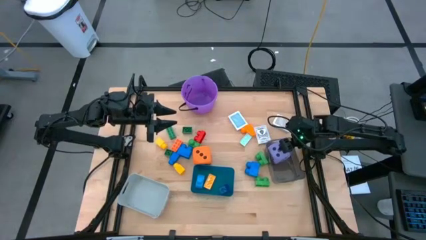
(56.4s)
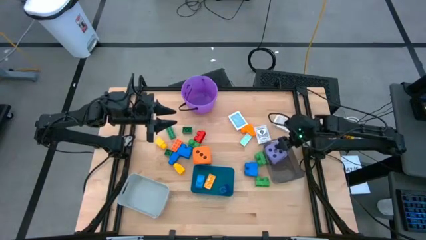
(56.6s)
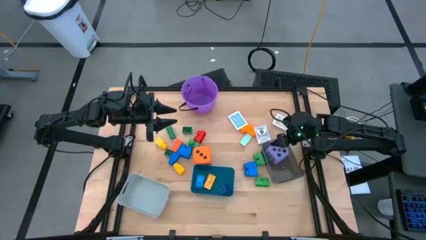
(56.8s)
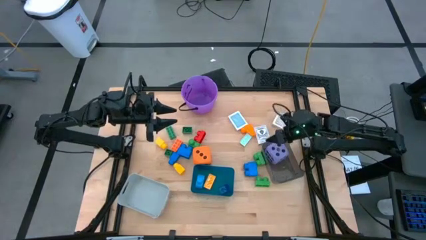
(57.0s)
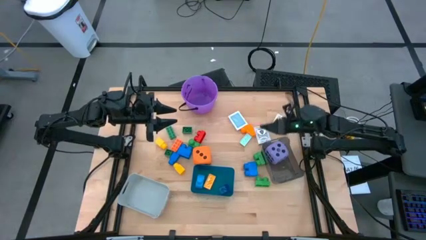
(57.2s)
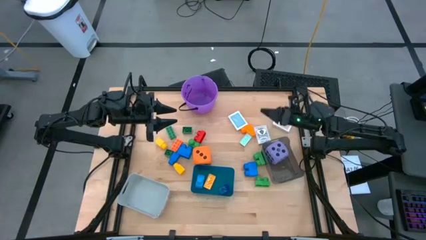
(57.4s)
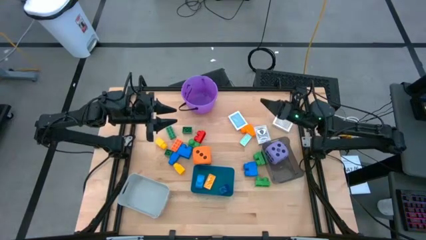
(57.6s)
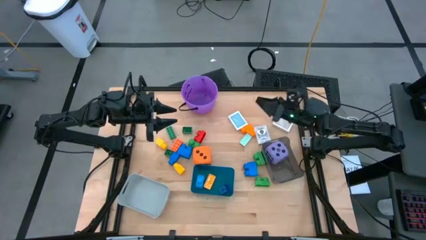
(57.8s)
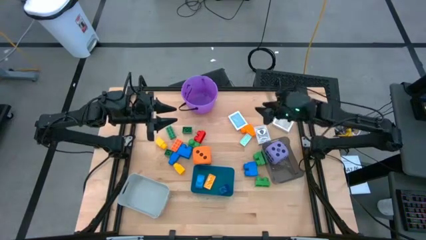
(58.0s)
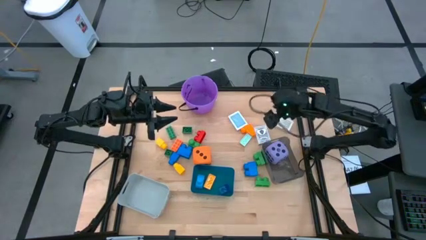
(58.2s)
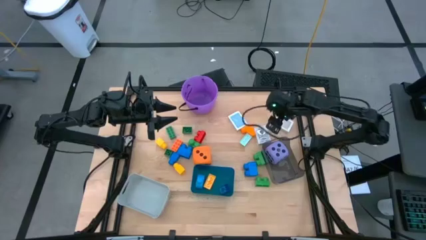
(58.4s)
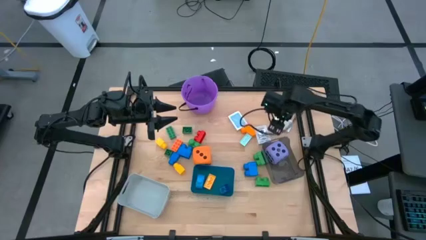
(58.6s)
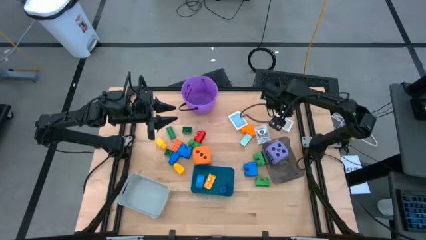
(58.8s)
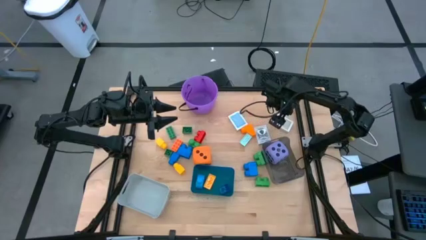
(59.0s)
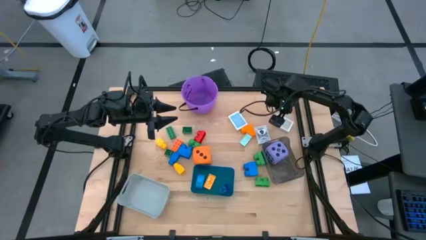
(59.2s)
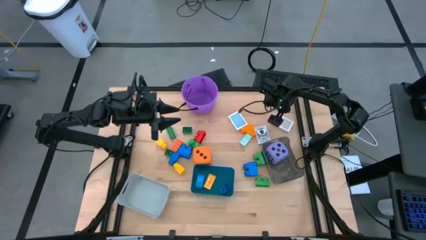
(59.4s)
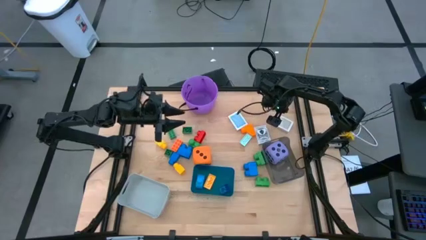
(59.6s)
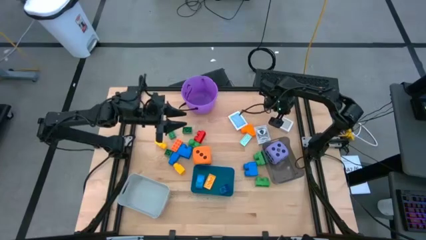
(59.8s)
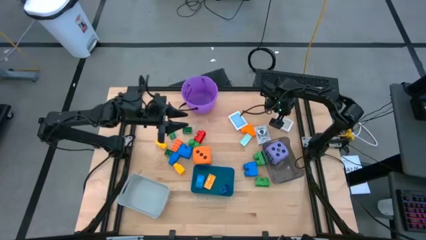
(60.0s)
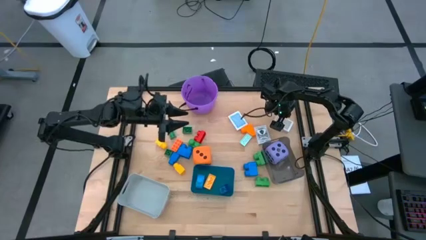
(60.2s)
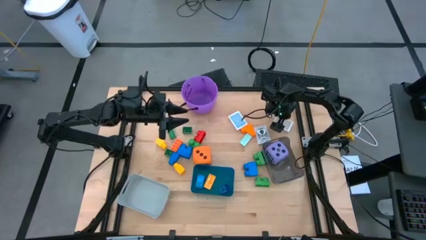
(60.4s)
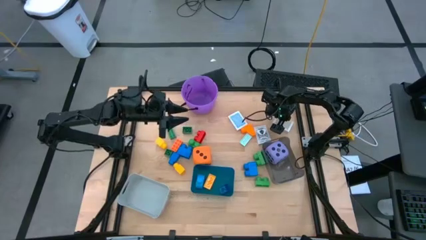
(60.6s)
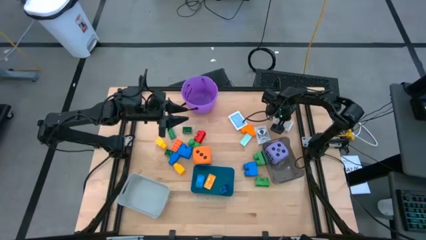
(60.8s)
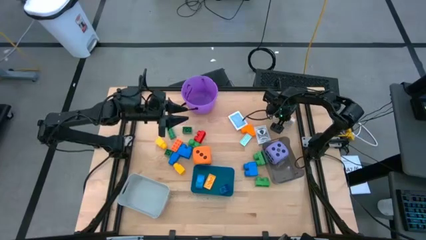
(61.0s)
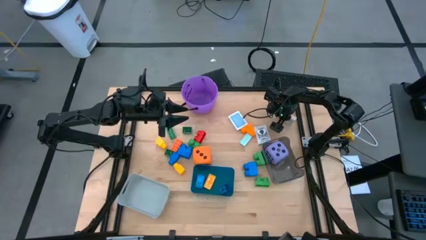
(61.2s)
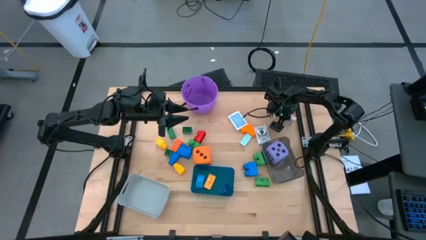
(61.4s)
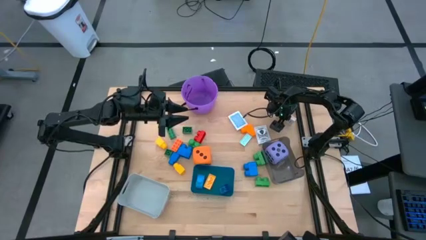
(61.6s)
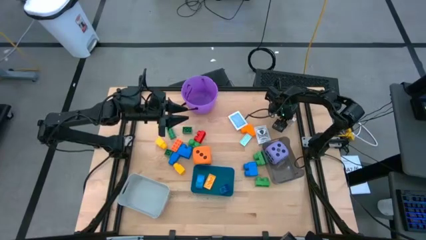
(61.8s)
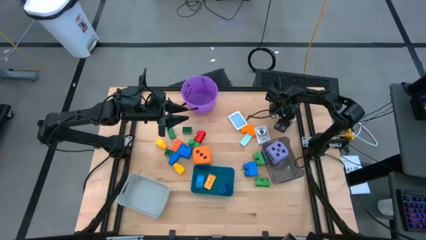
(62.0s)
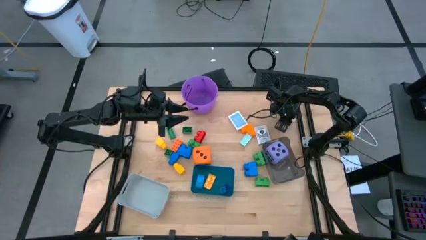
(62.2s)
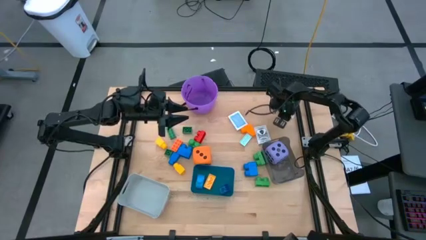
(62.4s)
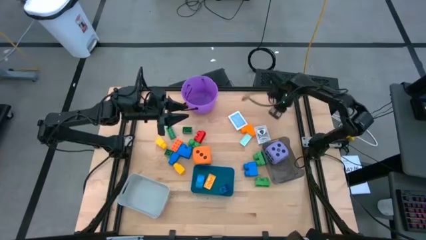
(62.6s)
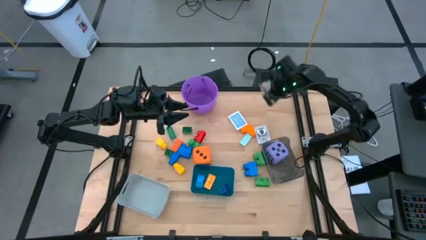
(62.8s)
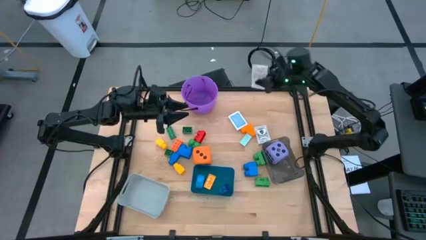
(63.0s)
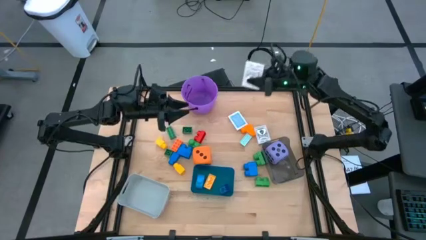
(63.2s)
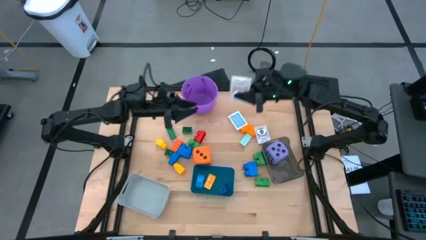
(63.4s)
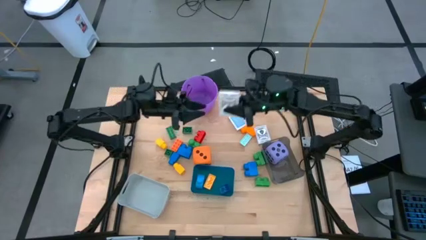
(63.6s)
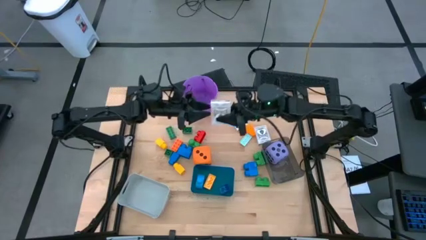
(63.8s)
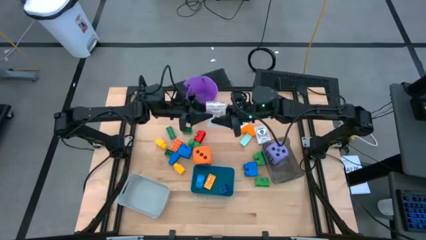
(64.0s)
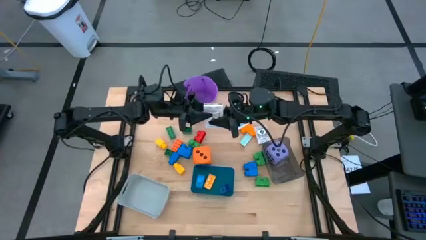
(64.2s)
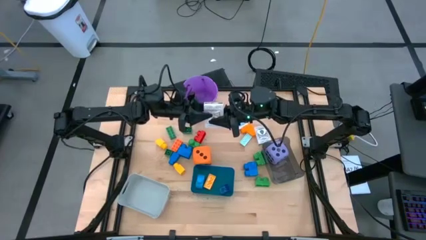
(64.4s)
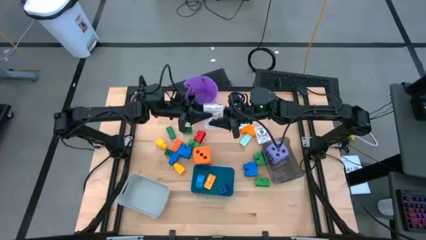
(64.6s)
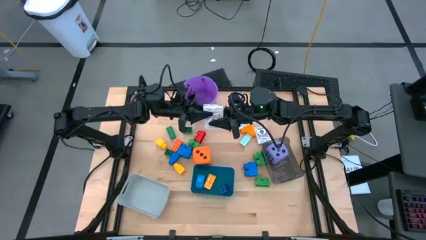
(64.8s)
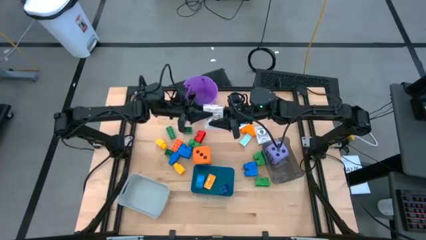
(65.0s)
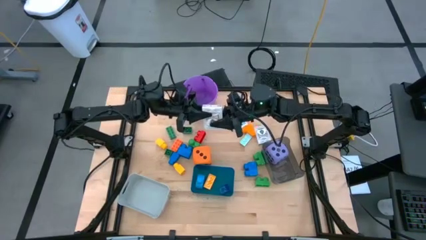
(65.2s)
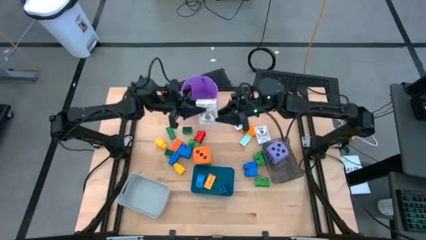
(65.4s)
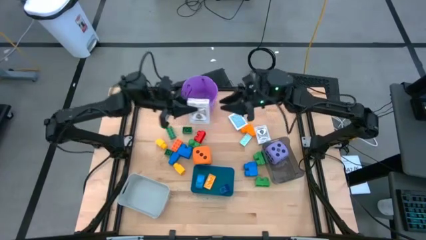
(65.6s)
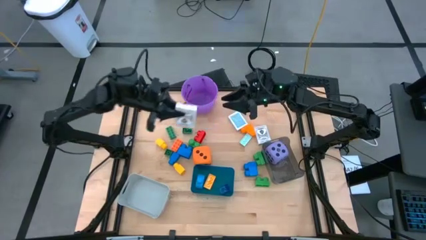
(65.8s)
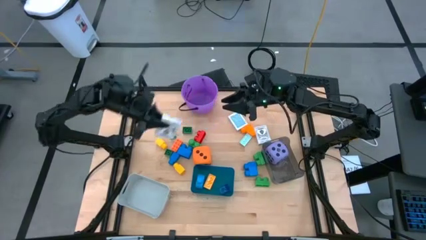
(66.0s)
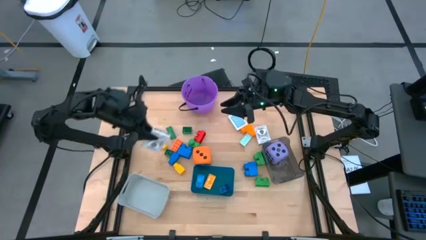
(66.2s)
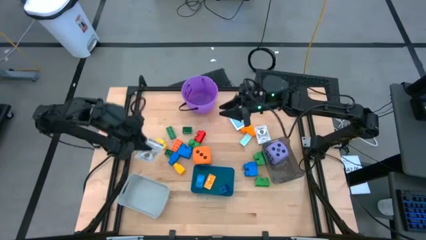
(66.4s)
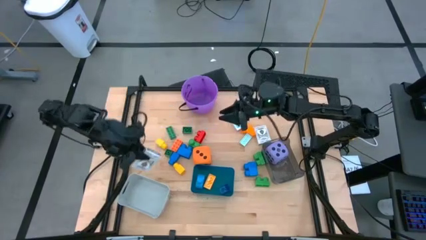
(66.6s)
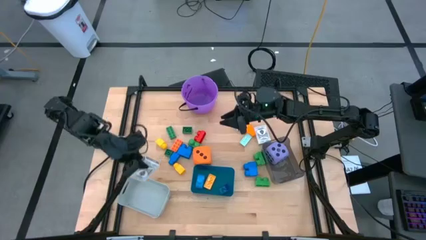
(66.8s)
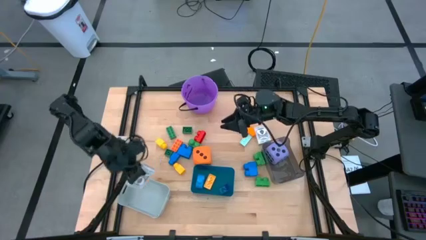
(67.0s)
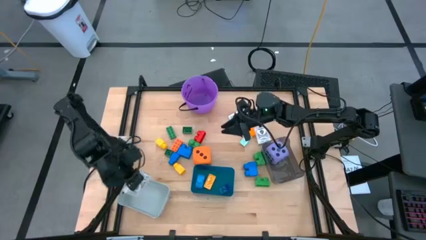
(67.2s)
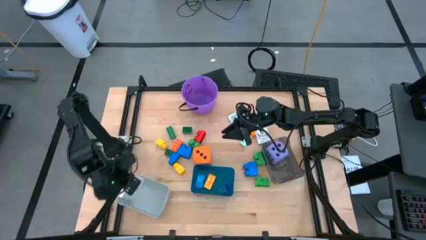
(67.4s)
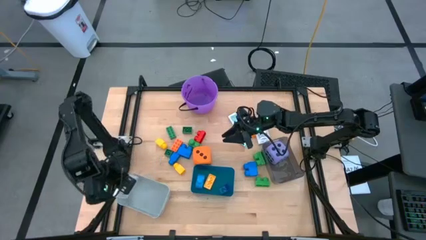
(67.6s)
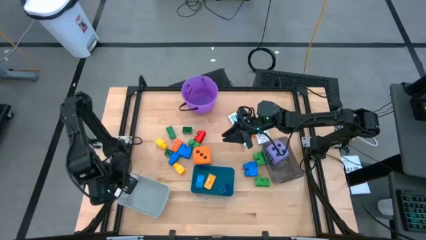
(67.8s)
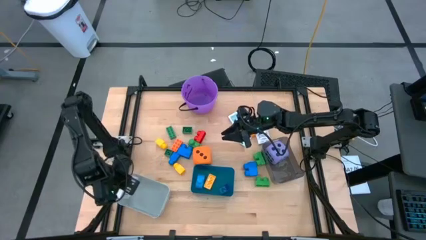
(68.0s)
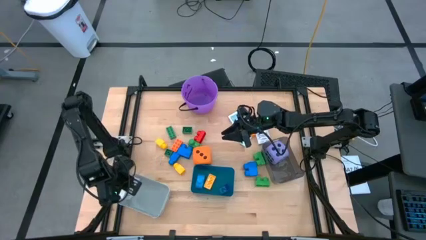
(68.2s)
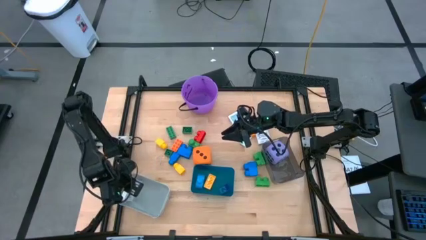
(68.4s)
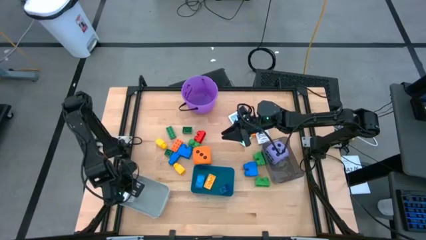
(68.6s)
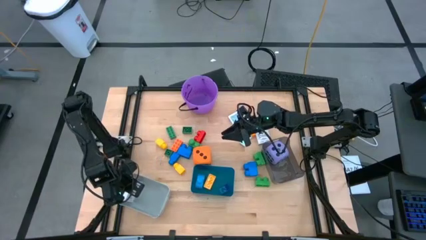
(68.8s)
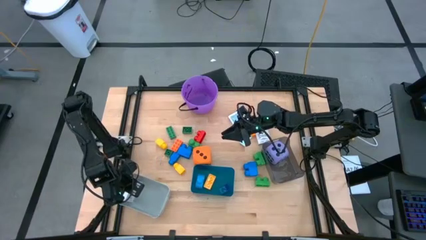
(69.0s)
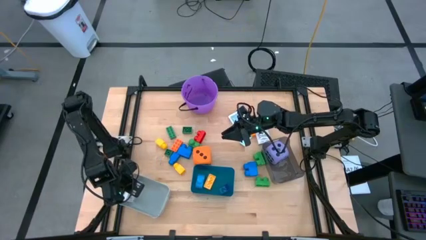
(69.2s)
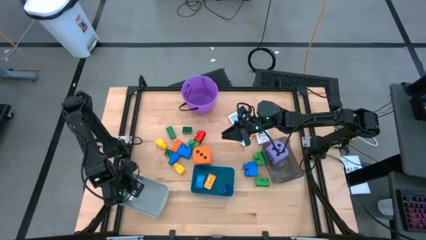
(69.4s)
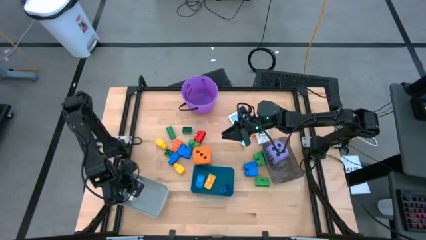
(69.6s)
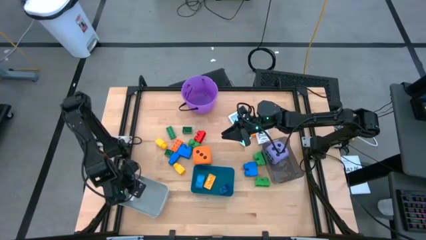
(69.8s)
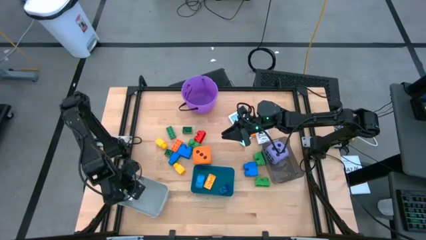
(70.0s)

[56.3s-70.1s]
Task: Pick & Place Toys
Put the brown deck of cards into the gray bin
